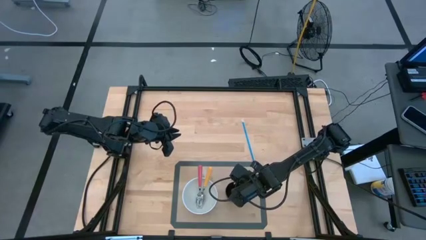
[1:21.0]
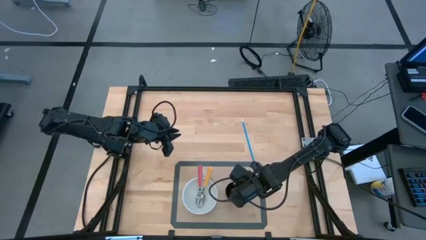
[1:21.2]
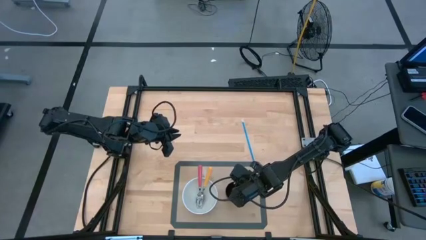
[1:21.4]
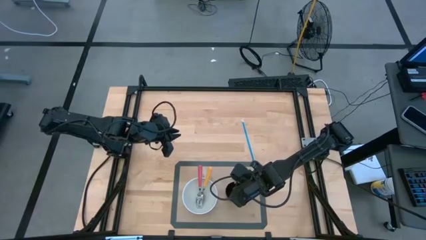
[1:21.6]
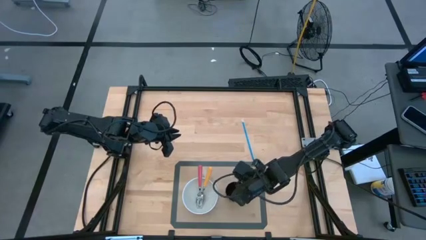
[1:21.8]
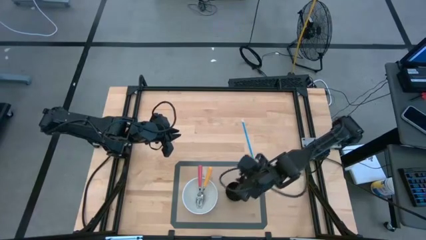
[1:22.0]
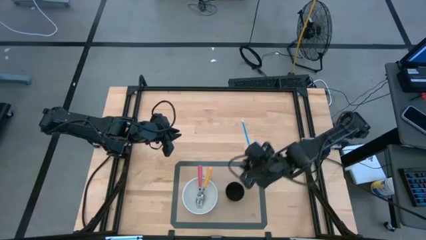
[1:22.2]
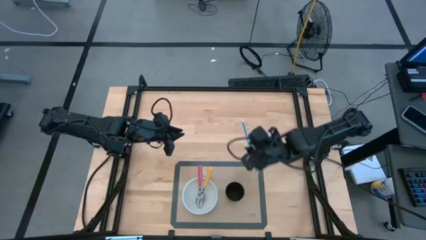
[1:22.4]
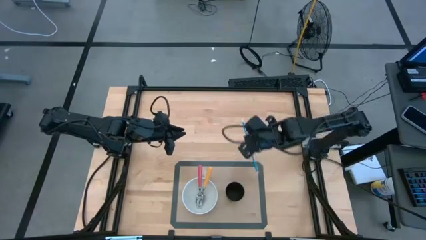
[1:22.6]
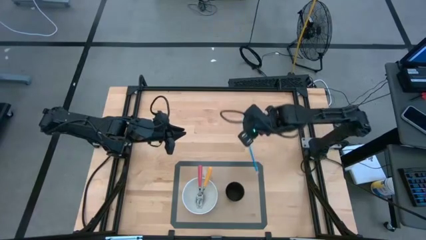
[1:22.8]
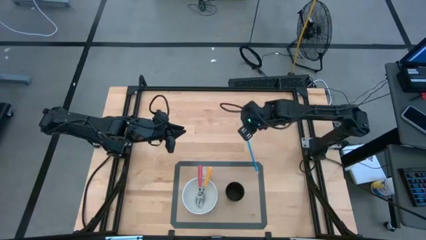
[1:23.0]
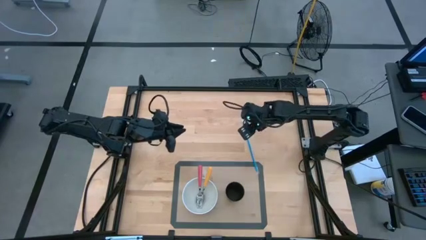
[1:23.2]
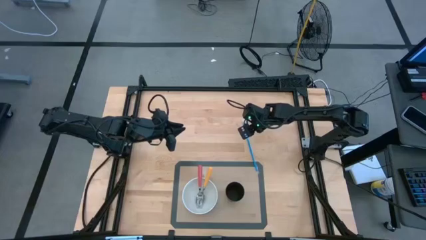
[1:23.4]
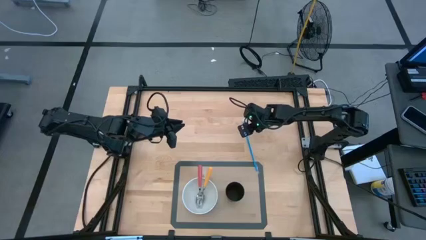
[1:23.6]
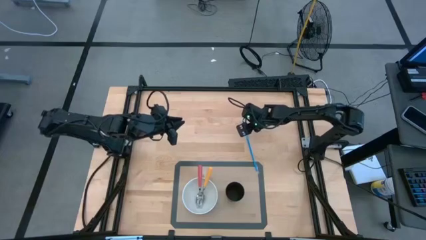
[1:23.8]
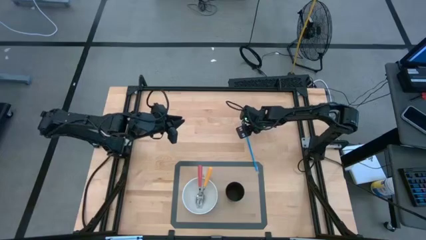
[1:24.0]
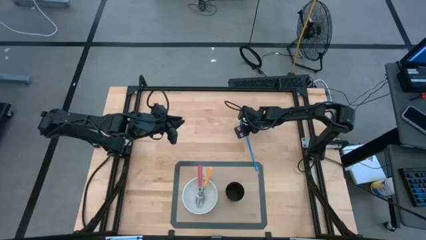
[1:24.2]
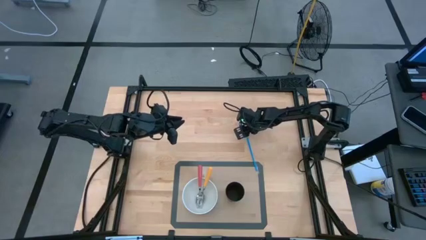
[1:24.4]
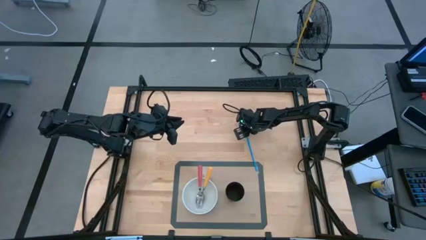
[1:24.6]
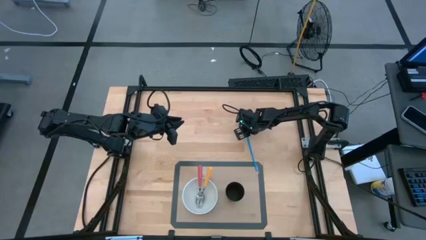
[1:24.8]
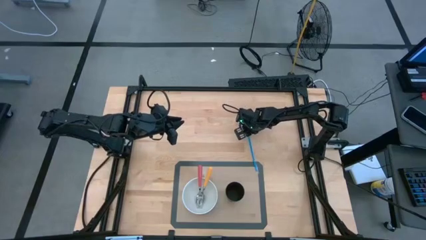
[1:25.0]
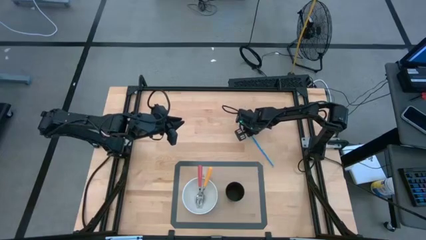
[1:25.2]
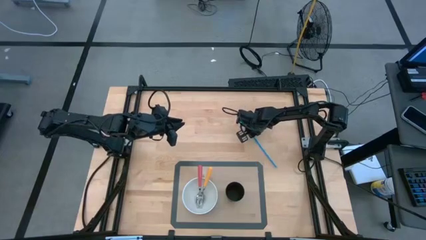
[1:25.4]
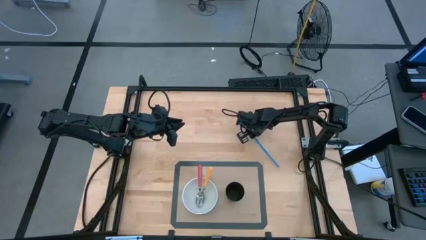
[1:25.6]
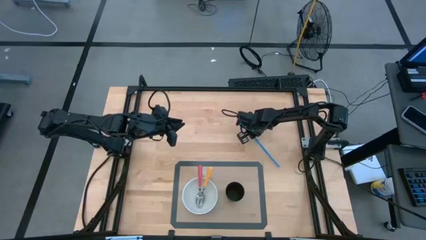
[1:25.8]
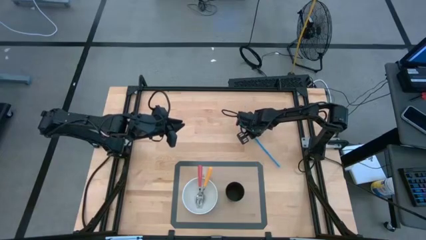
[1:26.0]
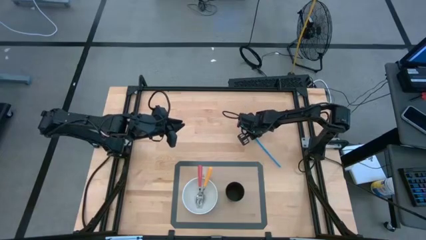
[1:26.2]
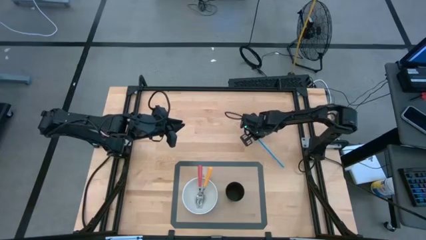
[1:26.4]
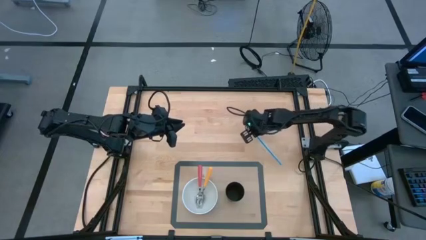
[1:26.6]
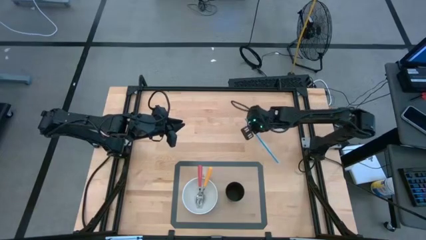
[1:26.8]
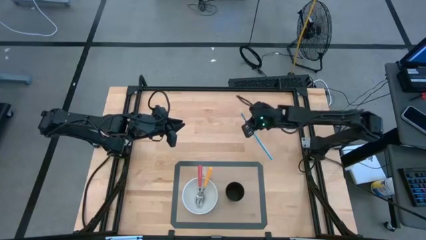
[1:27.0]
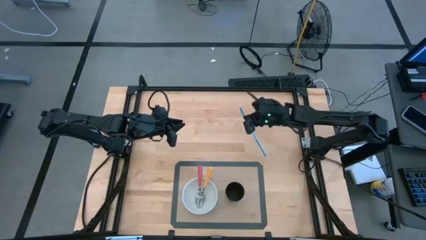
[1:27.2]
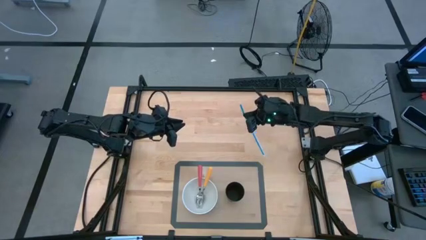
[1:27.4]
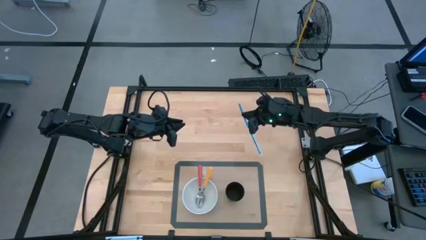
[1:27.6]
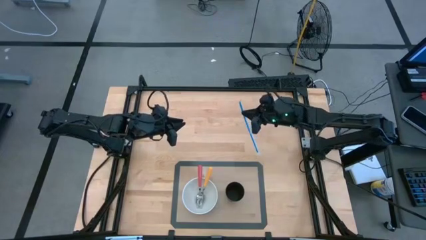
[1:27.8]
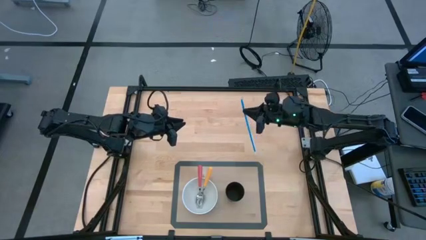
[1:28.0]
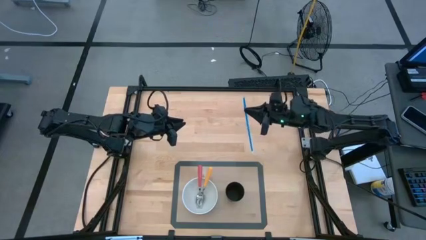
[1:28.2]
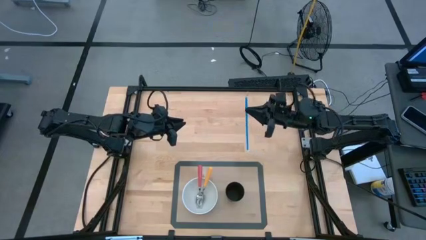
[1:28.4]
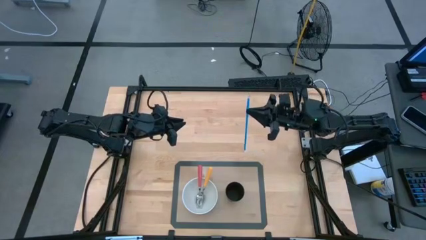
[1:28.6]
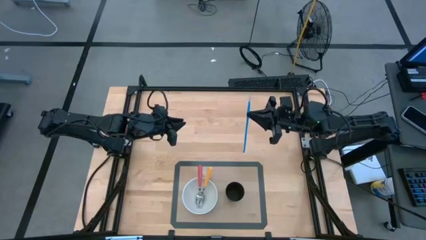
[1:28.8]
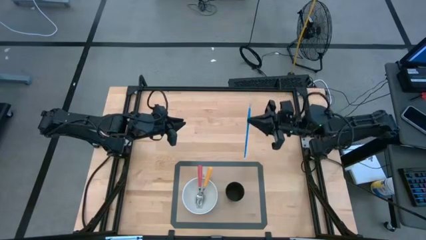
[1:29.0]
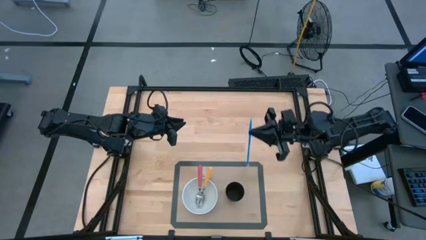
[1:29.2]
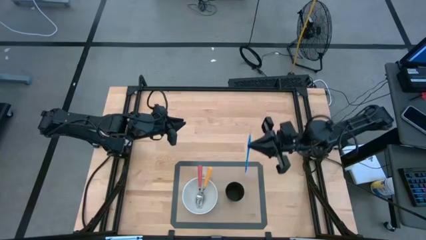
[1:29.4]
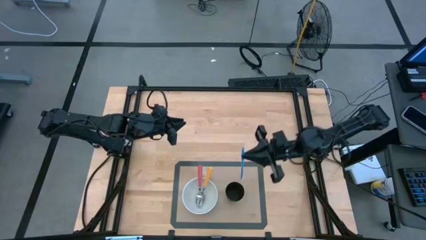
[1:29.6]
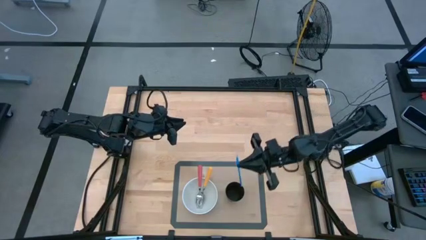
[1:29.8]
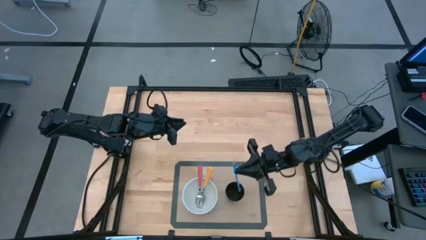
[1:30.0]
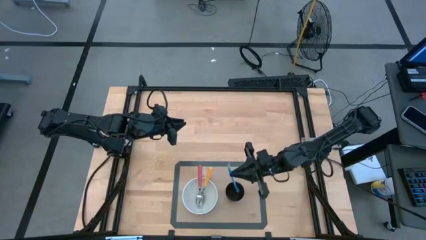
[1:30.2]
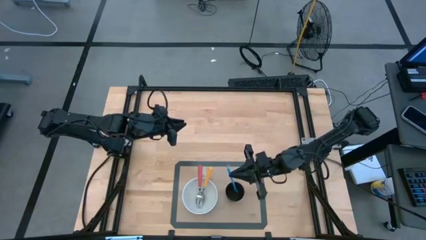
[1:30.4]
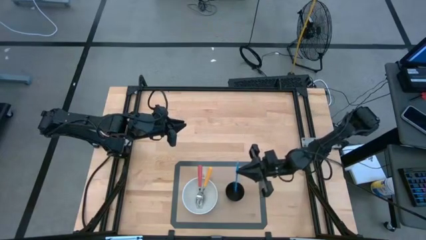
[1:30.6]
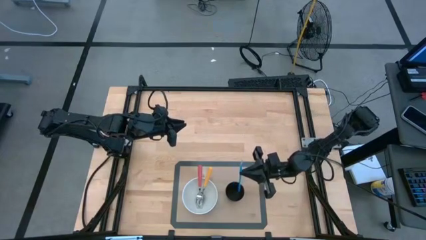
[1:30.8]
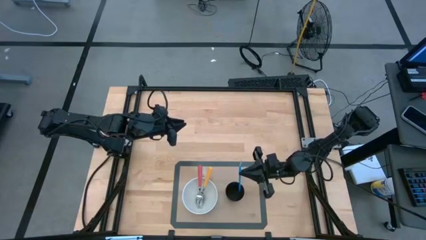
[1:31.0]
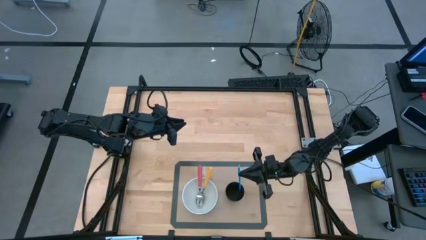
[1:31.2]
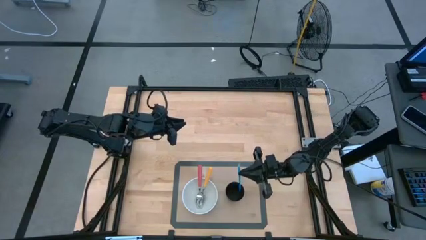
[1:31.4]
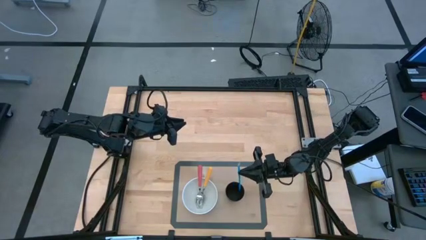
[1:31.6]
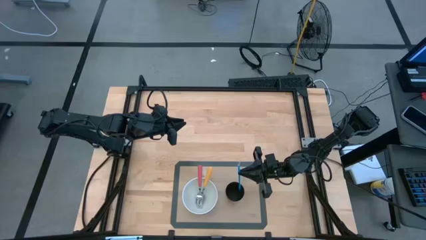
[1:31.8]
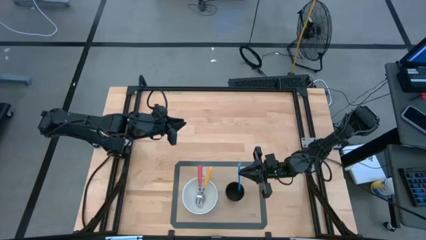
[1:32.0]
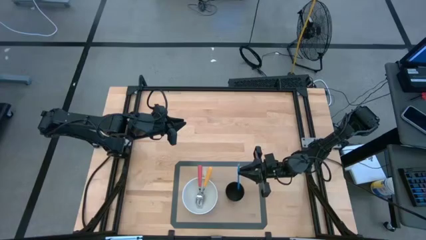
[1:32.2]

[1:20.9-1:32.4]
Task: Pick & Place Utensil
Put the blue straw into the black cup on the mat

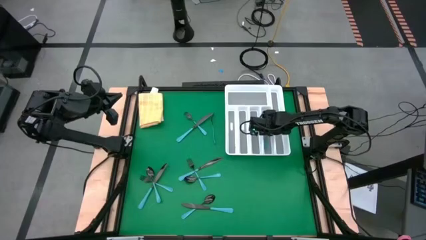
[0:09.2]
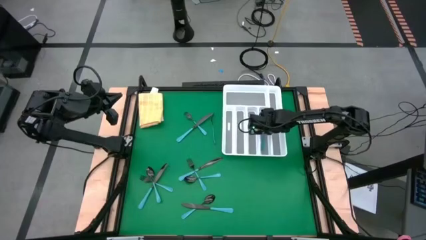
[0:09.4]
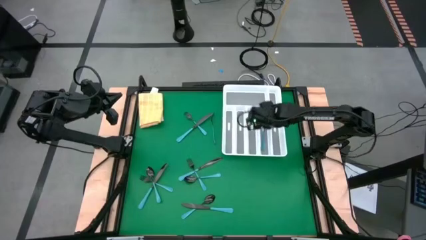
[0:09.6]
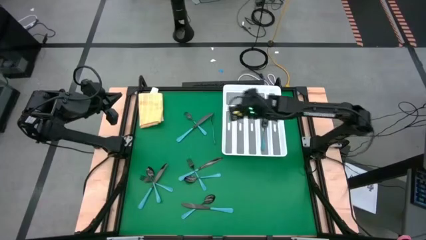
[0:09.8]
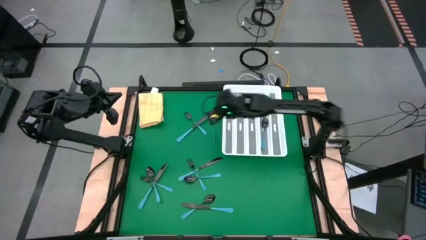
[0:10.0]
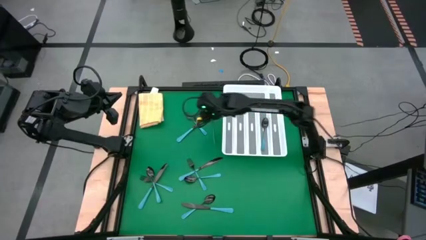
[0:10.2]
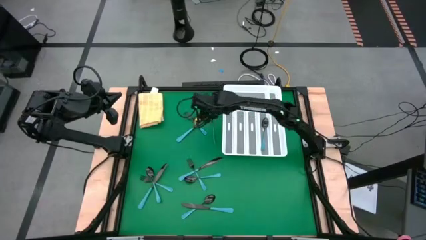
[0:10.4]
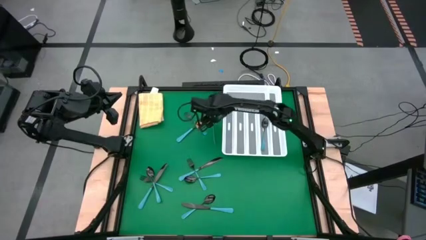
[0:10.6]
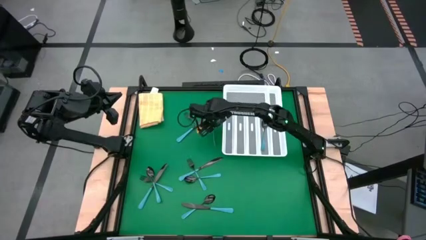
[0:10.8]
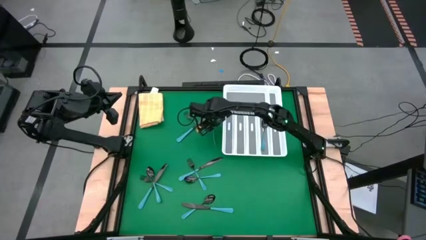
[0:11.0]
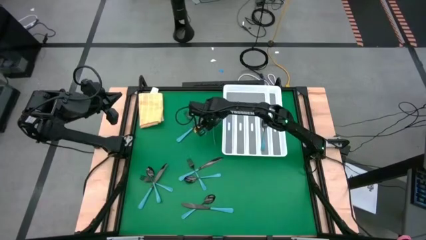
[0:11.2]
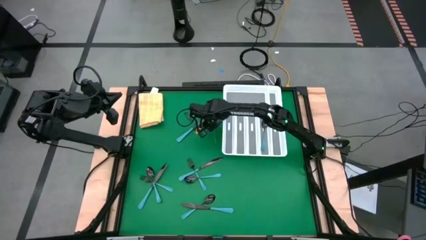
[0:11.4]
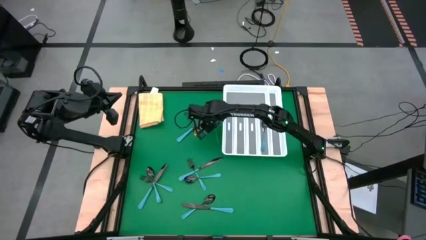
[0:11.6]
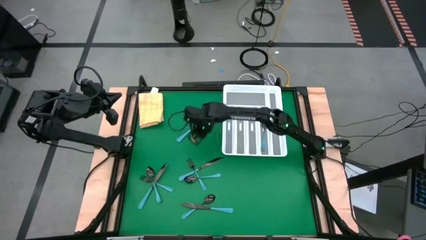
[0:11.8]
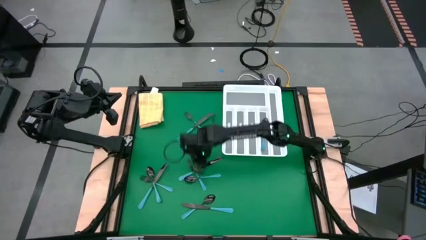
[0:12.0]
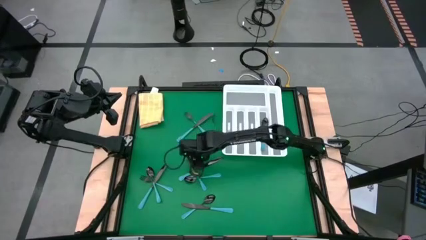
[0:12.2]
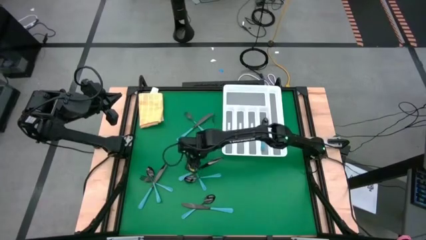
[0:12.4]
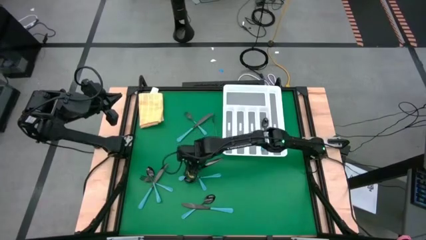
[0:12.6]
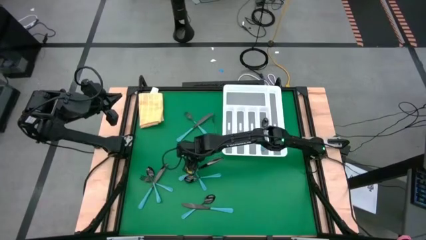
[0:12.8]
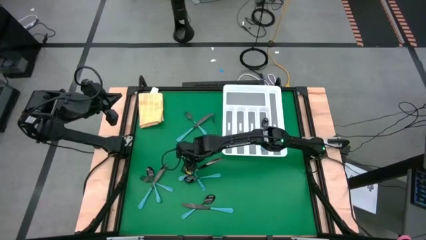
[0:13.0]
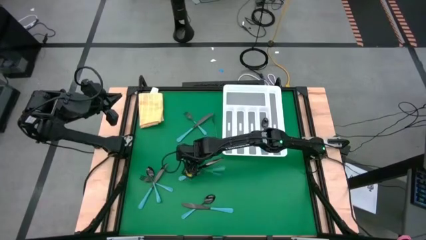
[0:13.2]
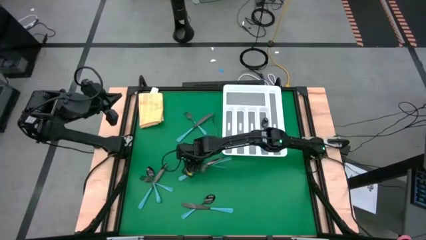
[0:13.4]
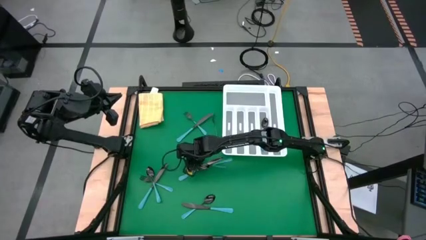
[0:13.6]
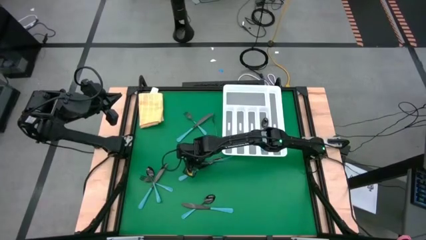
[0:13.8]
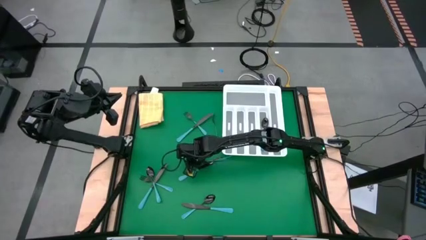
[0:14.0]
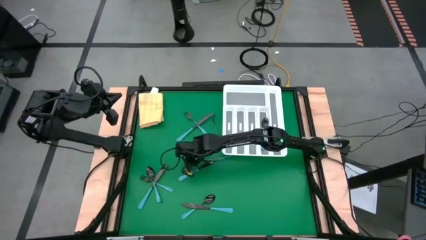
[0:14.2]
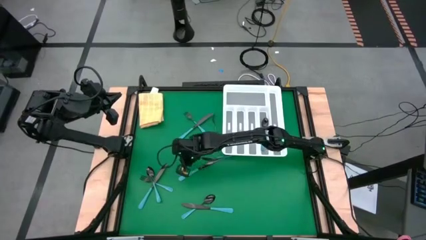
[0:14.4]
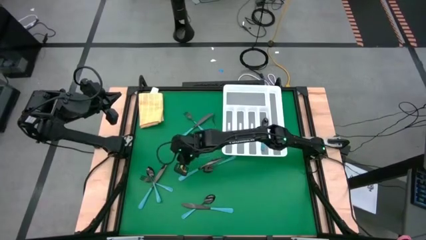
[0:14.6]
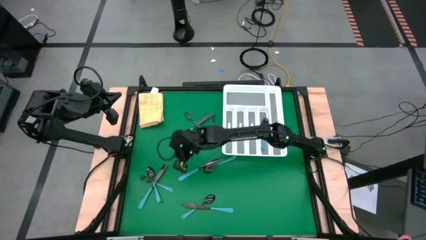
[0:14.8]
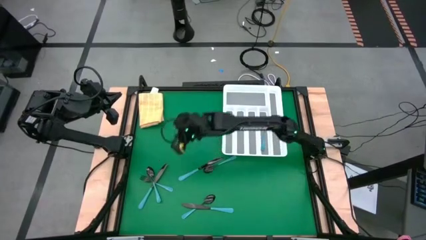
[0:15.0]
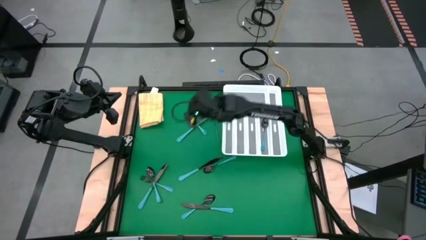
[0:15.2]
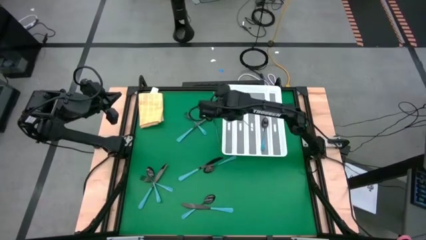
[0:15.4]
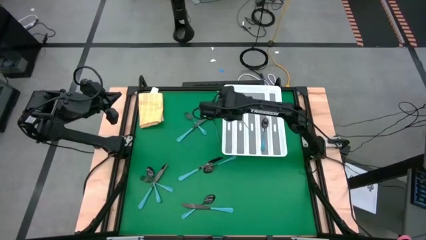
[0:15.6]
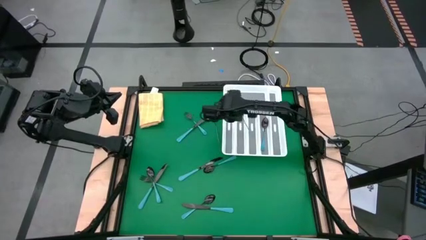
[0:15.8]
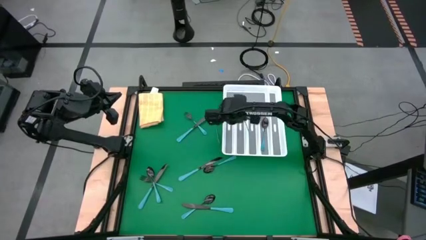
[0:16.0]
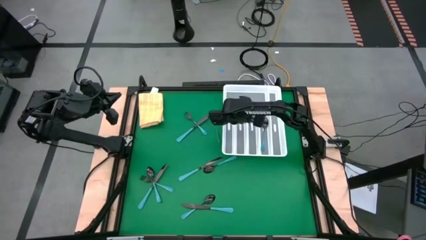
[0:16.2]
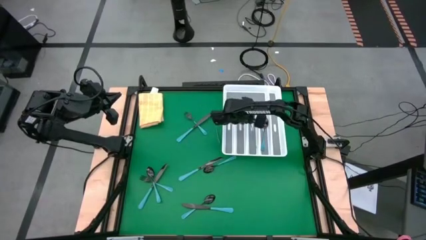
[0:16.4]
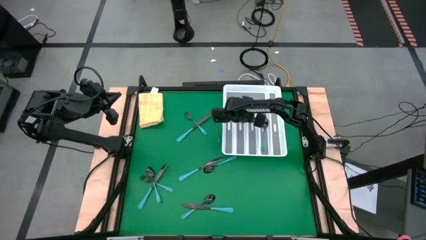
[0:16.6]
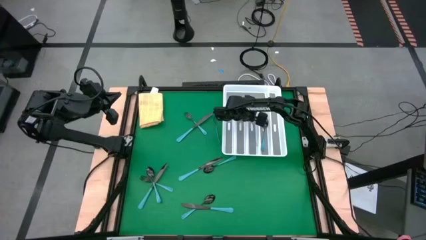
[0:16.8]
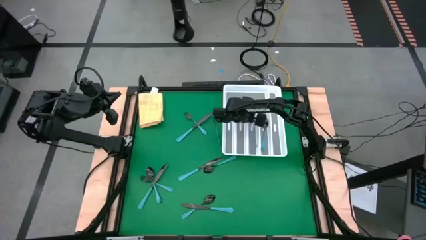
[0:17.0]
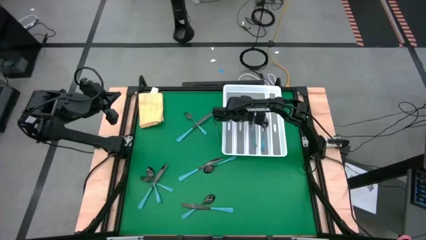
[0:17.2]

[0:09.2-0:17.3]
Task: Sort silverware
Put the blue fork into the white cutlery tray
